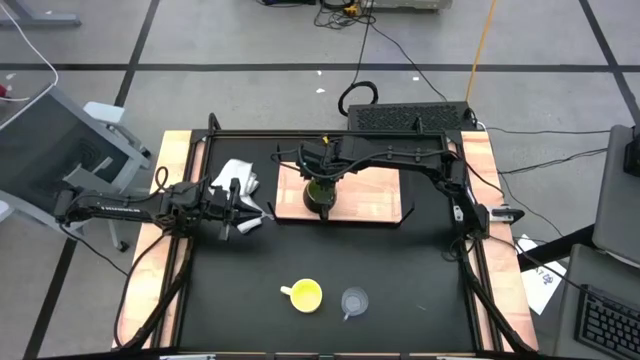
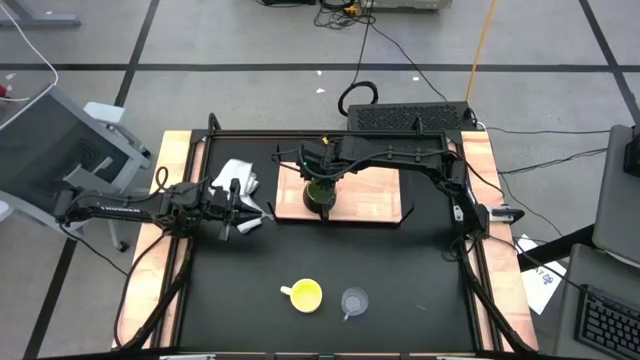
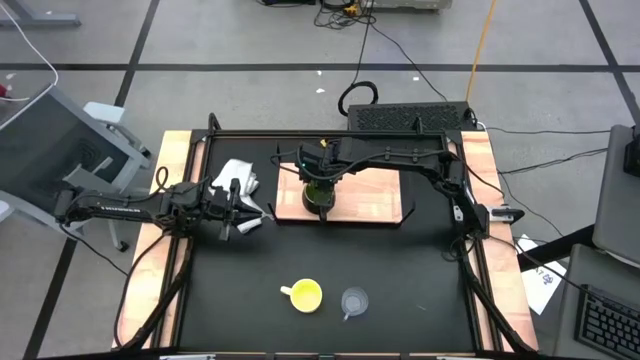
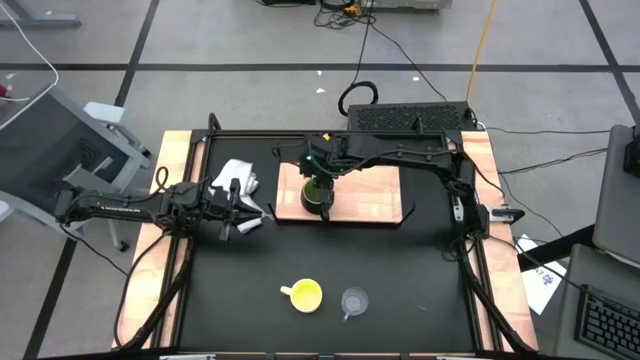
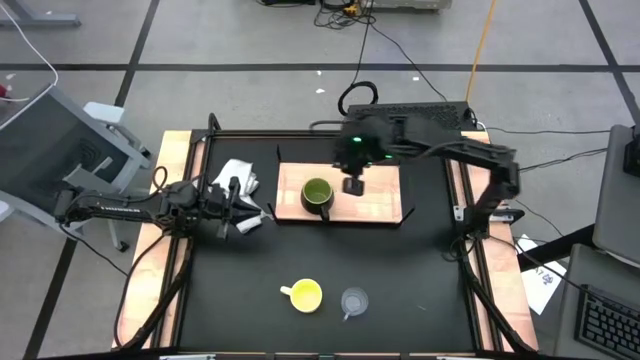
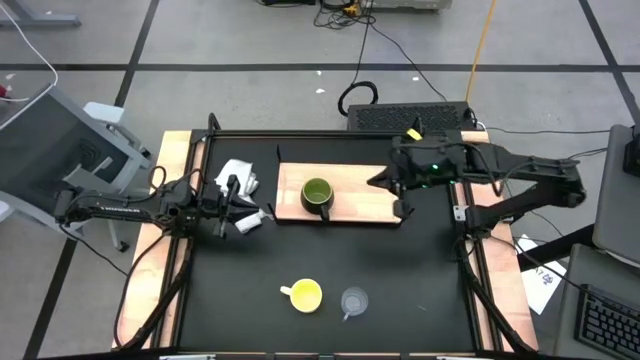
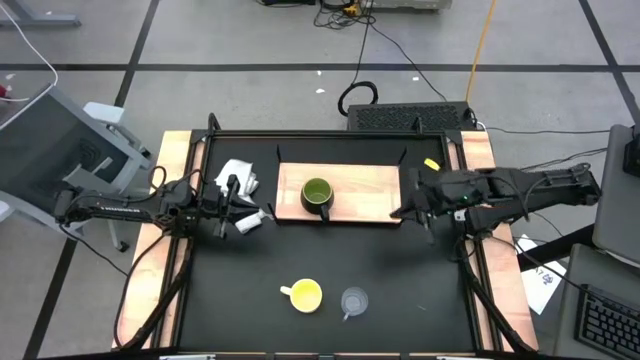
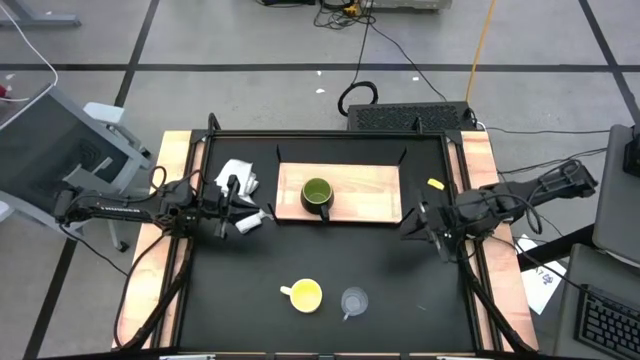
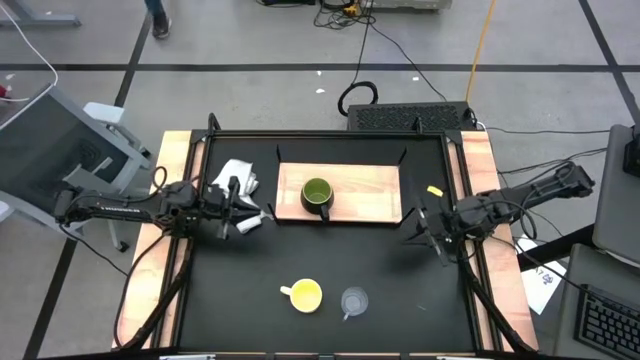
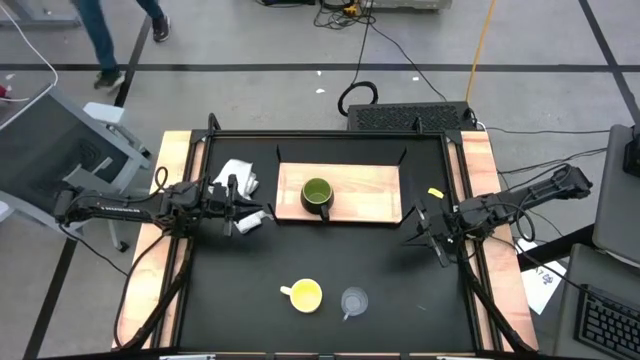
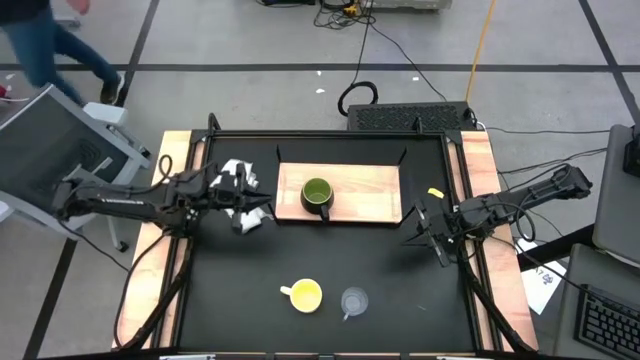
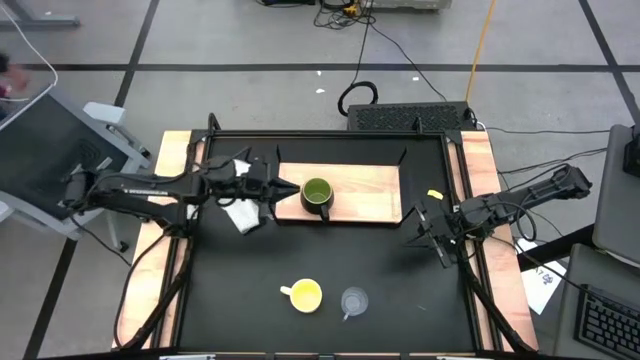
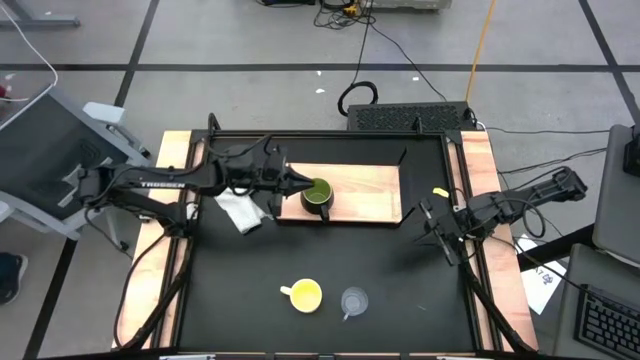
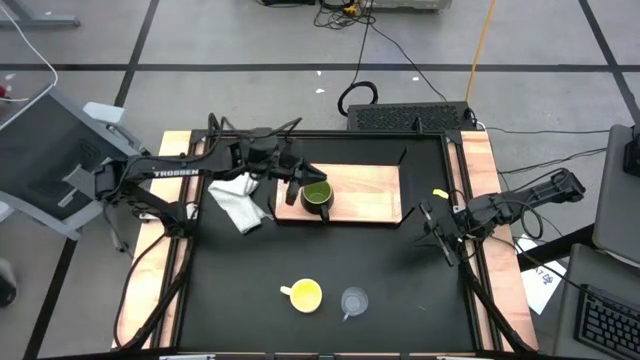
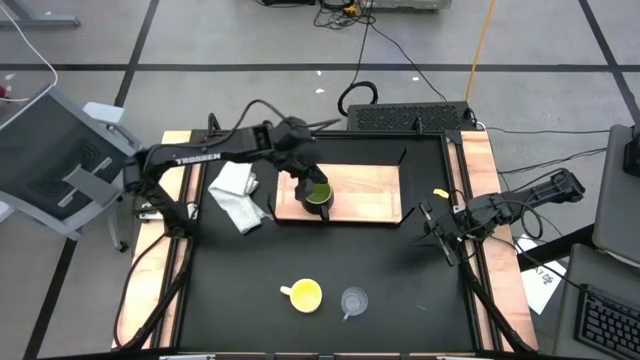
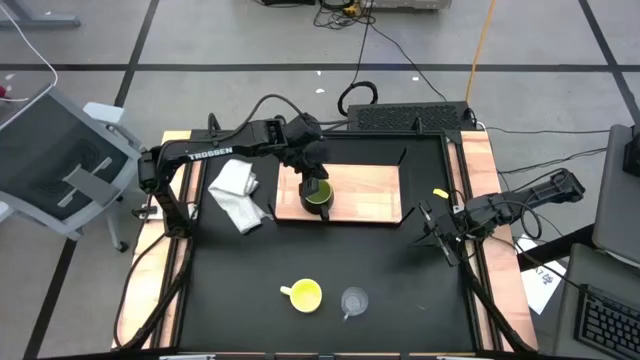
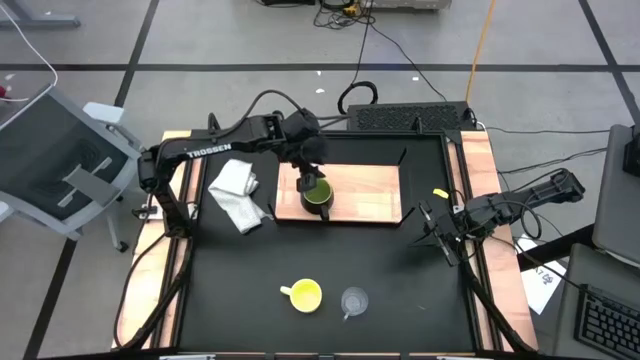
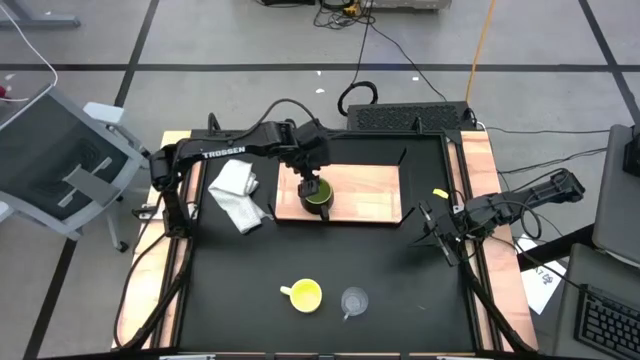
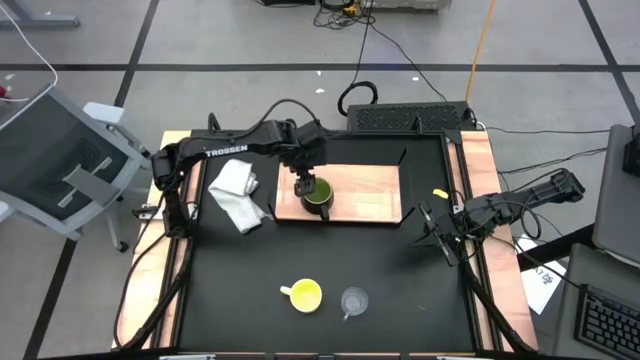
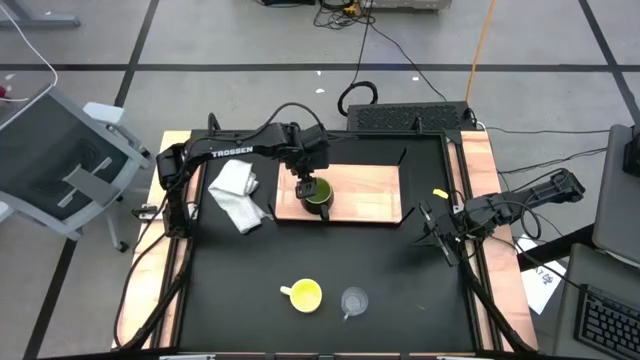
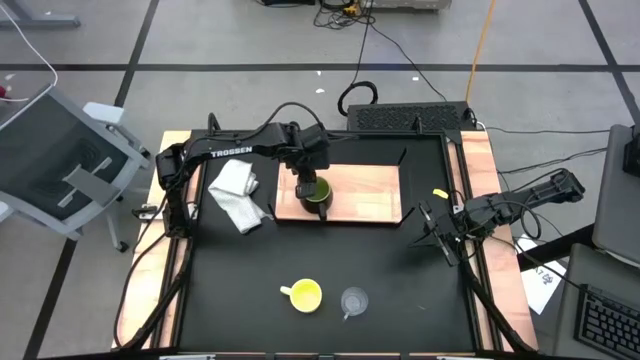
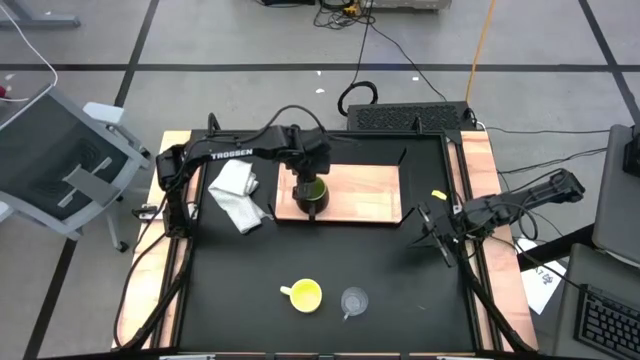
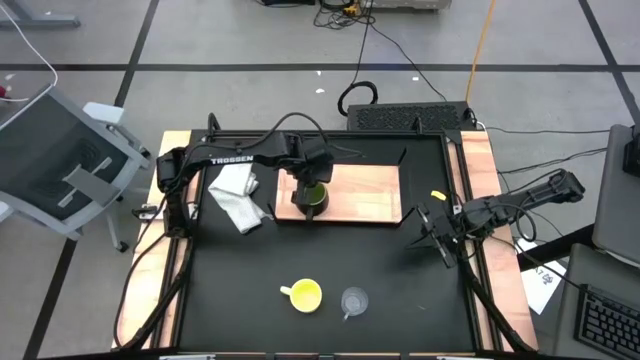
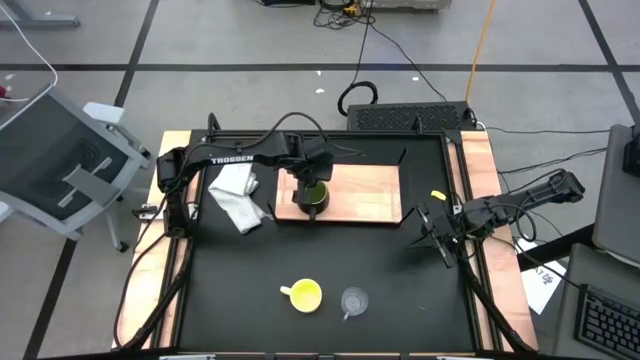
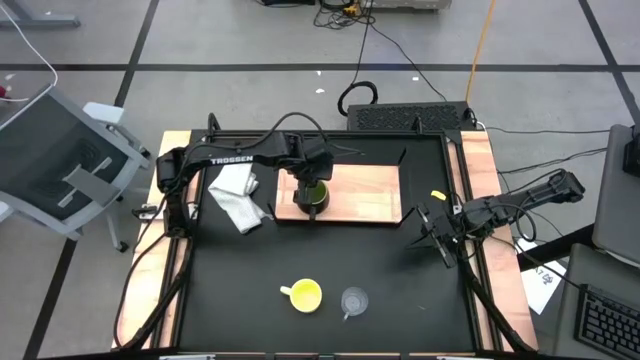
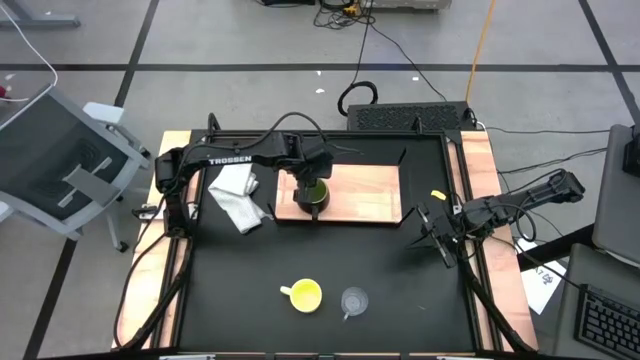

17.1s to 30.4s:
Task: Stack small to large cups/mugs on shelf
Put the black mug on the shelf

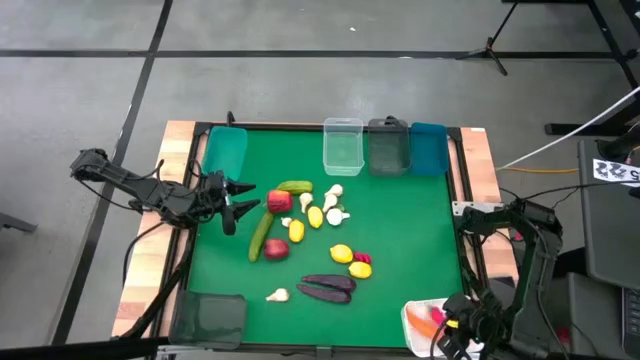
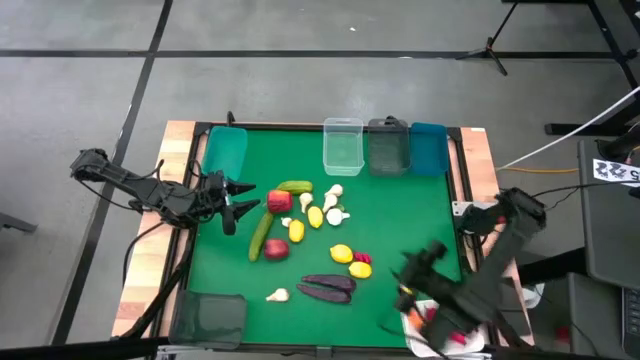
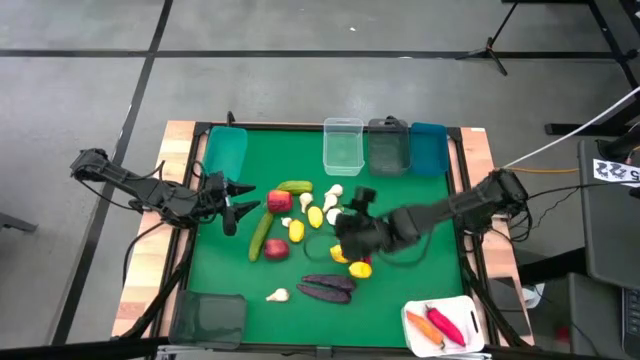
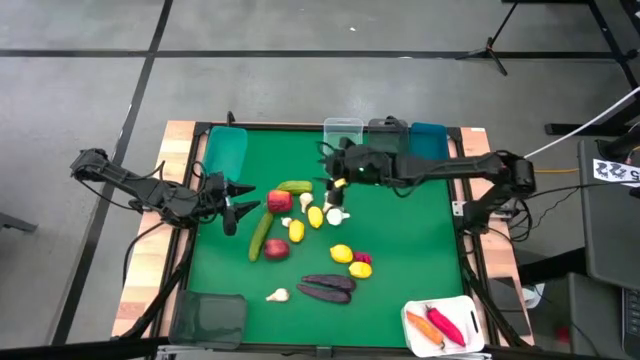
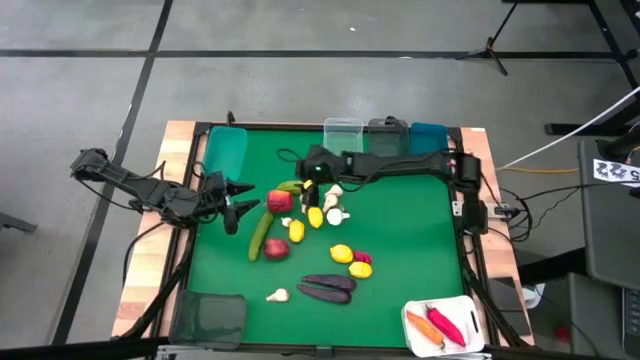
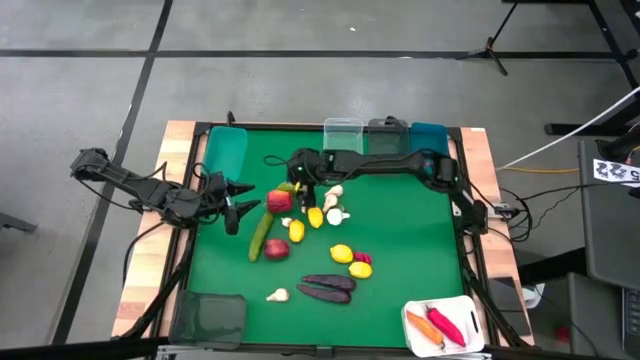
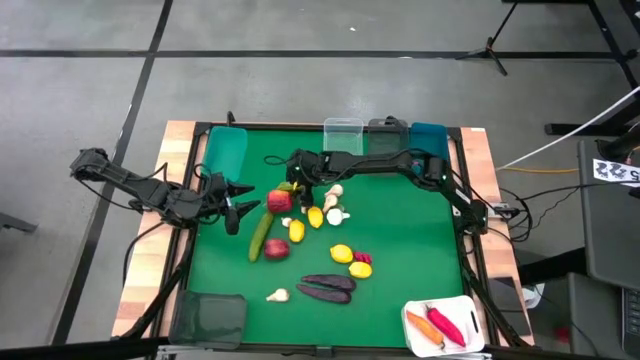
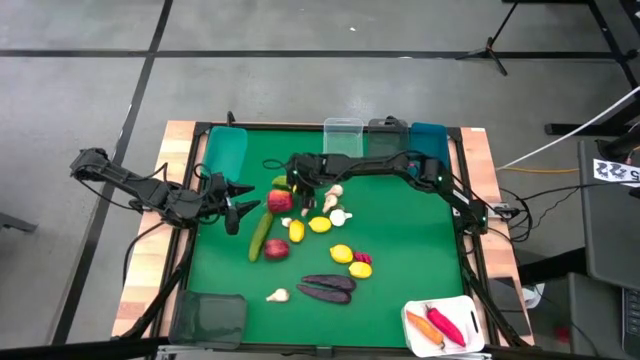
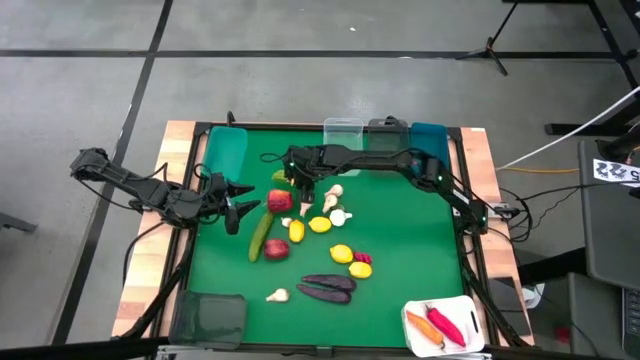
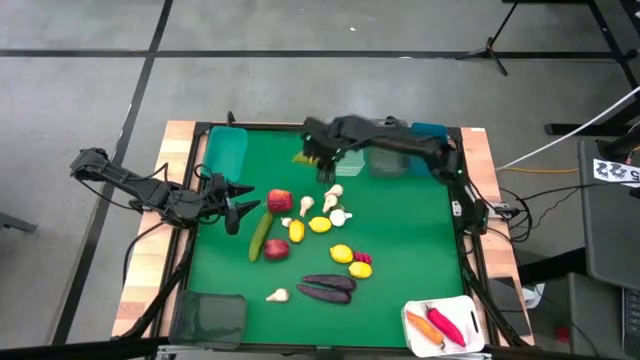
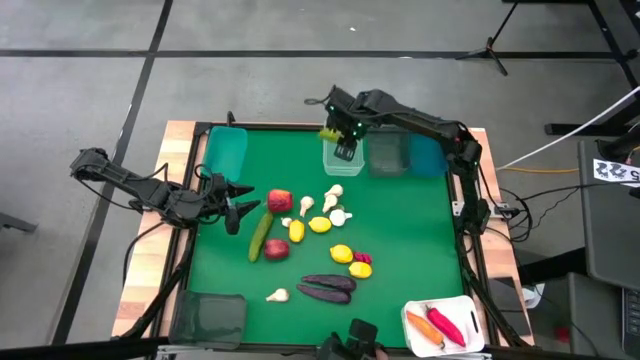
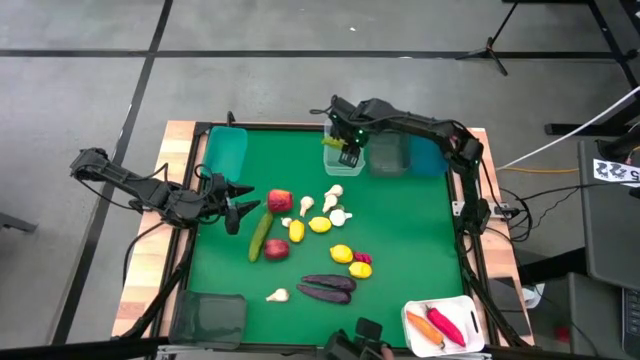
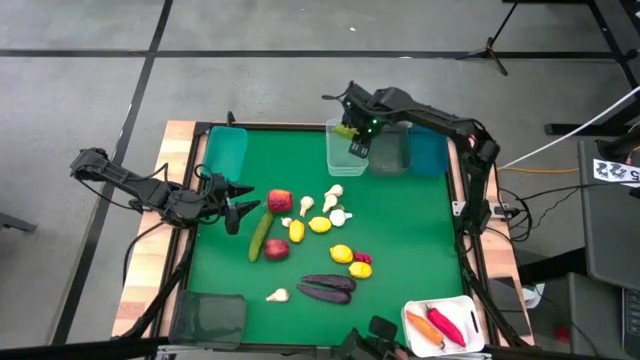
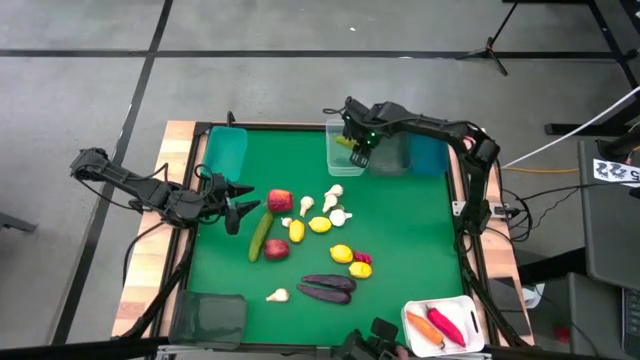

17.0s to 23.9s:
Task: Sort produce into baskets
Put the green cucumber into the transparent bin

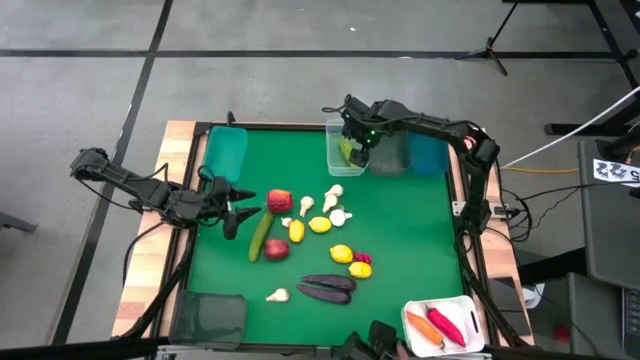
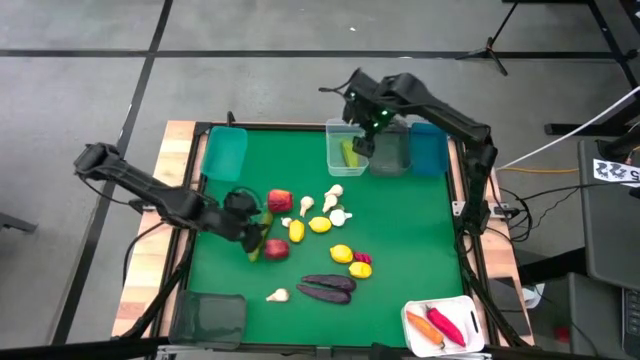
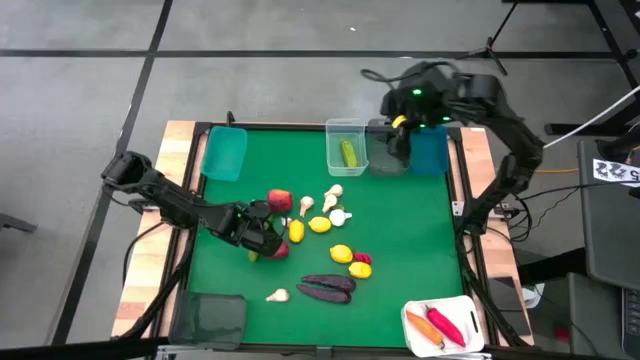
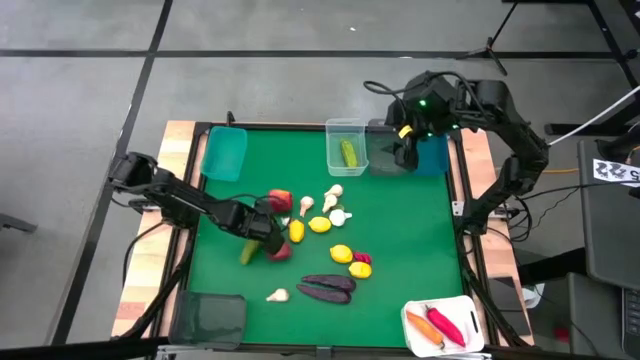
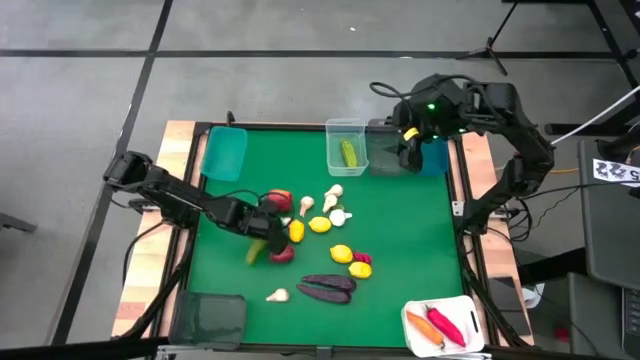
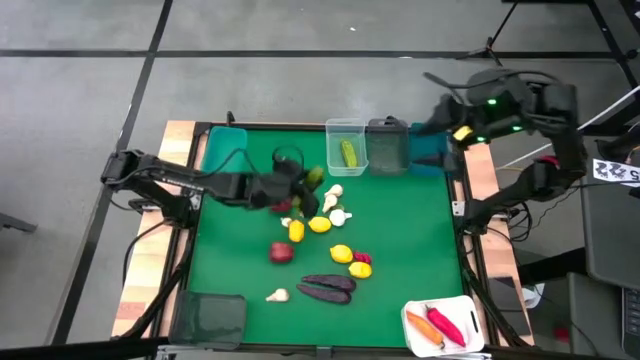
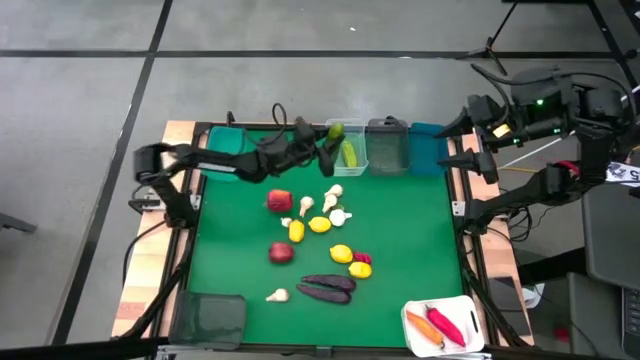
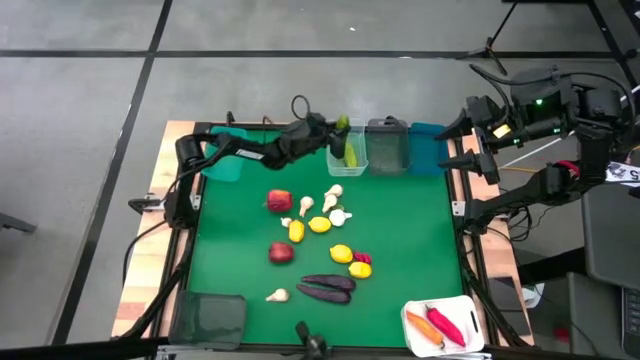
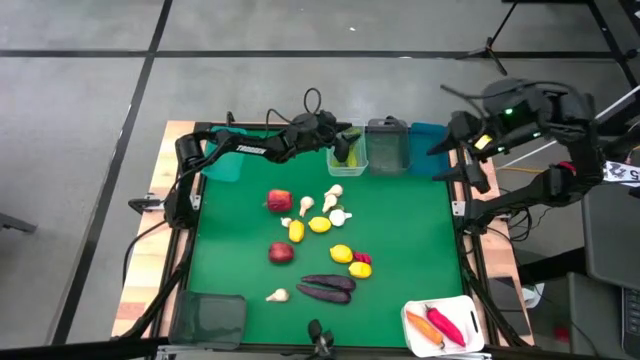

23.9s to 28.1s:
Put the green cucumber into the transparent bin
